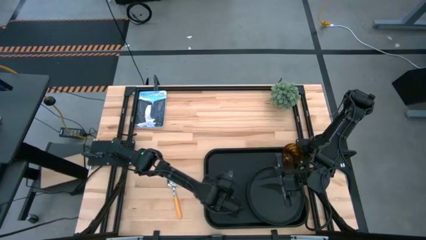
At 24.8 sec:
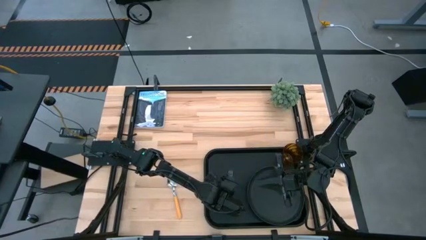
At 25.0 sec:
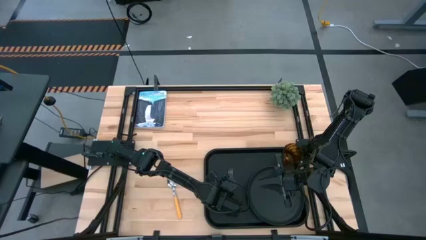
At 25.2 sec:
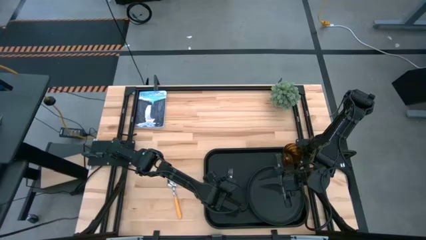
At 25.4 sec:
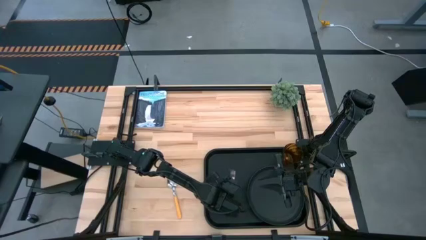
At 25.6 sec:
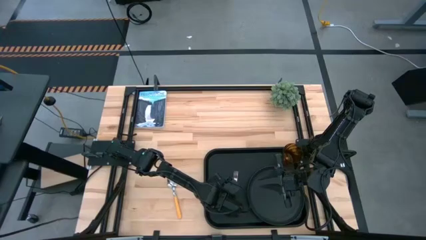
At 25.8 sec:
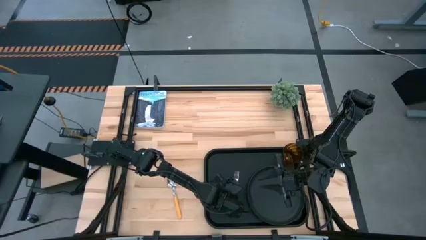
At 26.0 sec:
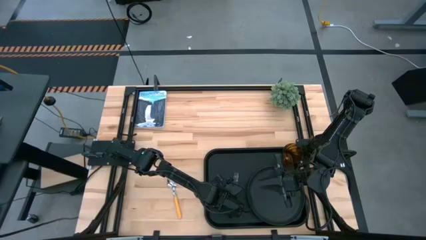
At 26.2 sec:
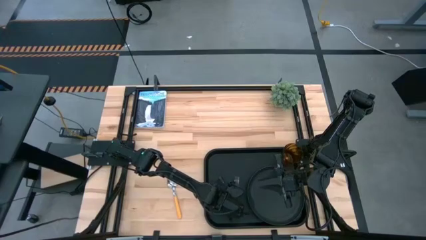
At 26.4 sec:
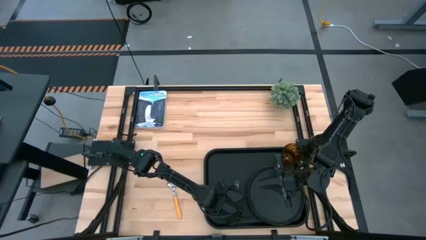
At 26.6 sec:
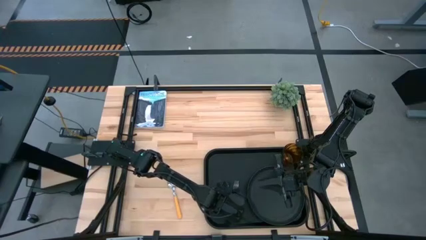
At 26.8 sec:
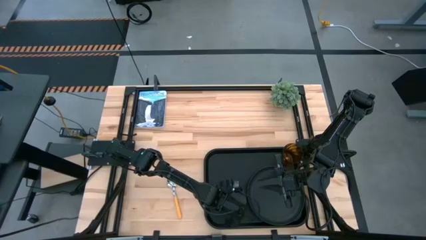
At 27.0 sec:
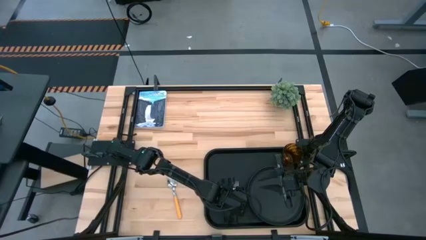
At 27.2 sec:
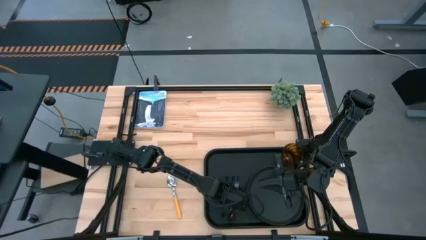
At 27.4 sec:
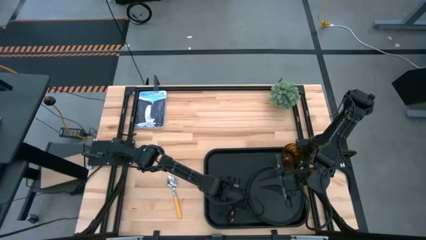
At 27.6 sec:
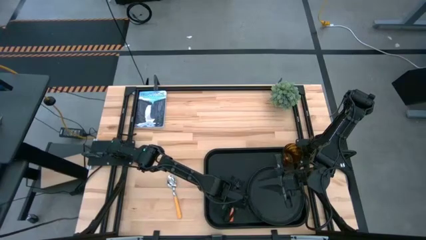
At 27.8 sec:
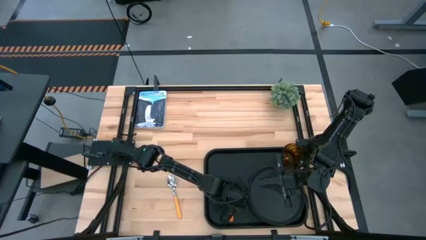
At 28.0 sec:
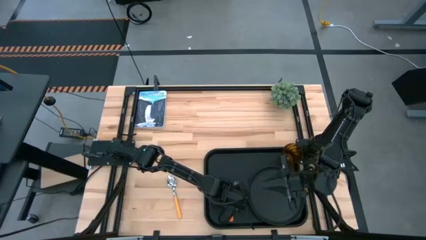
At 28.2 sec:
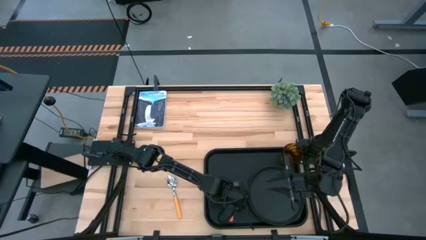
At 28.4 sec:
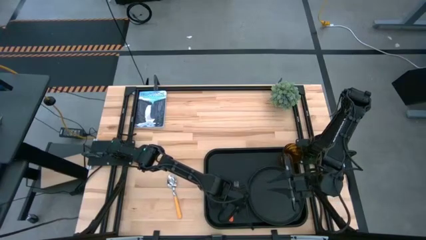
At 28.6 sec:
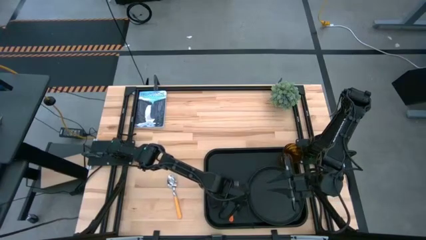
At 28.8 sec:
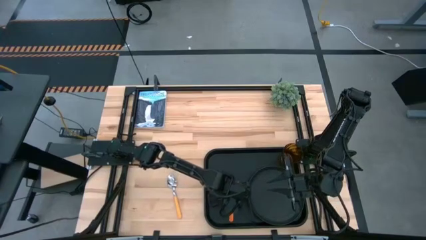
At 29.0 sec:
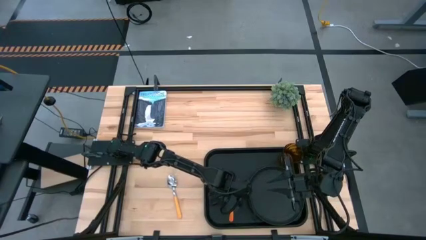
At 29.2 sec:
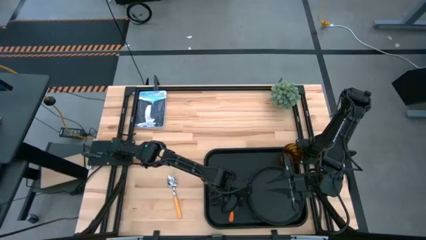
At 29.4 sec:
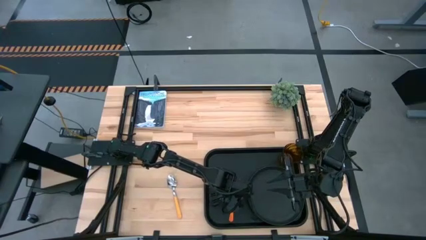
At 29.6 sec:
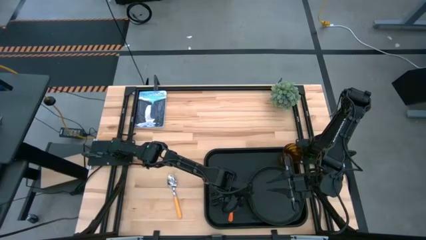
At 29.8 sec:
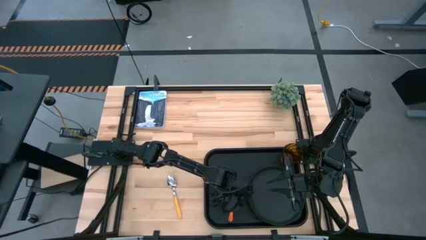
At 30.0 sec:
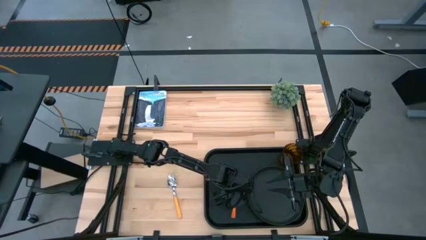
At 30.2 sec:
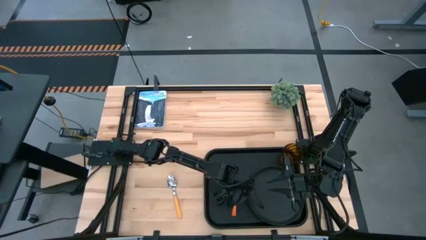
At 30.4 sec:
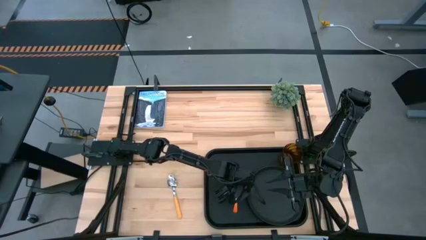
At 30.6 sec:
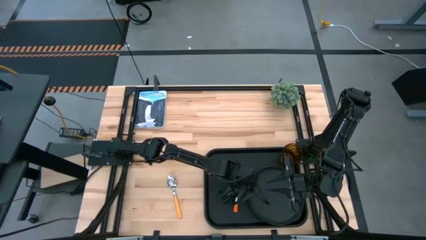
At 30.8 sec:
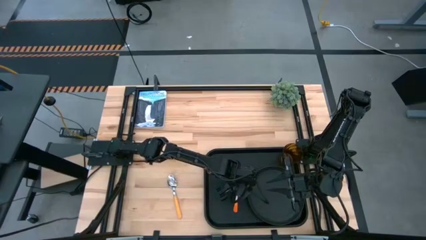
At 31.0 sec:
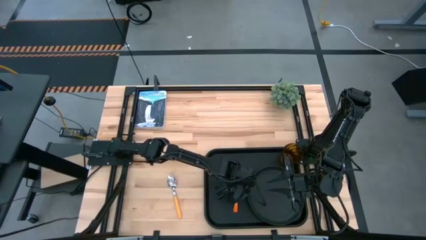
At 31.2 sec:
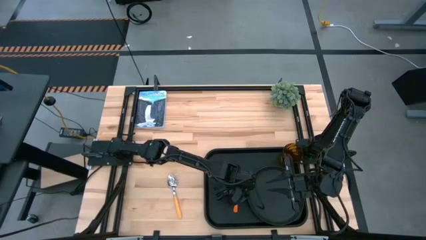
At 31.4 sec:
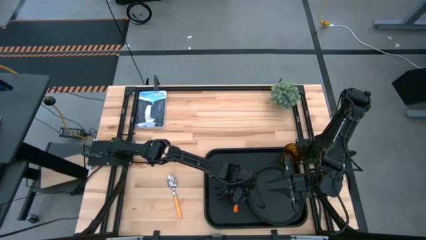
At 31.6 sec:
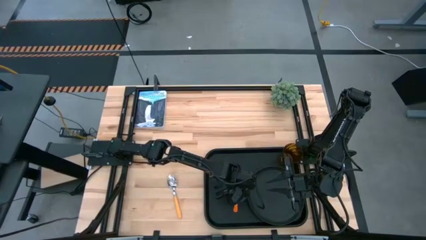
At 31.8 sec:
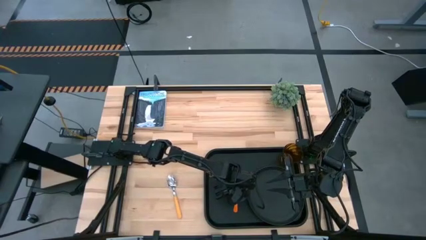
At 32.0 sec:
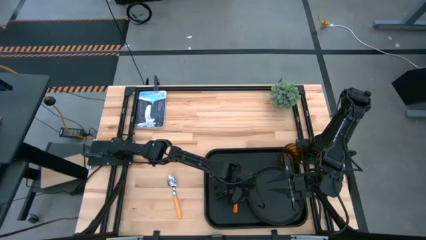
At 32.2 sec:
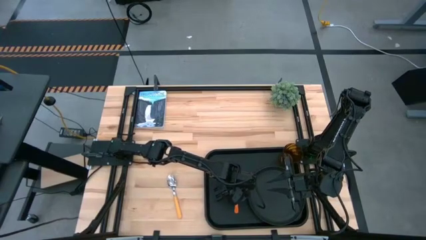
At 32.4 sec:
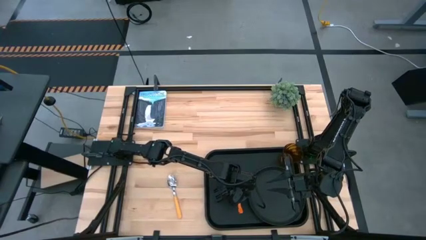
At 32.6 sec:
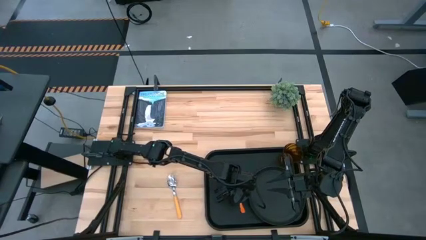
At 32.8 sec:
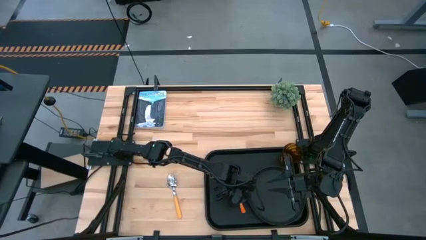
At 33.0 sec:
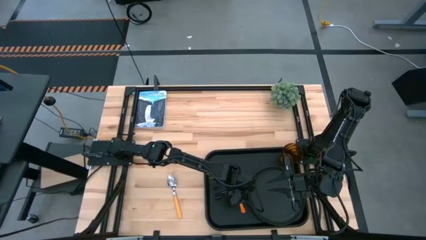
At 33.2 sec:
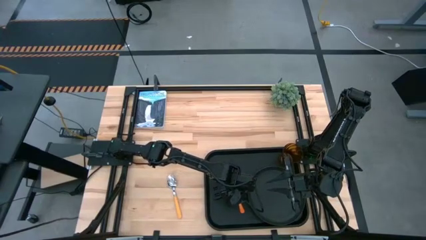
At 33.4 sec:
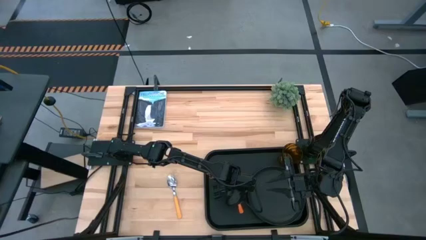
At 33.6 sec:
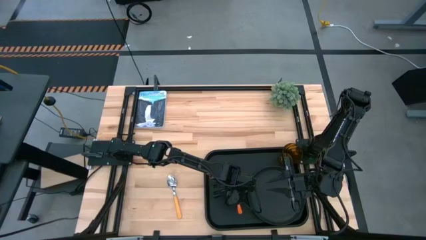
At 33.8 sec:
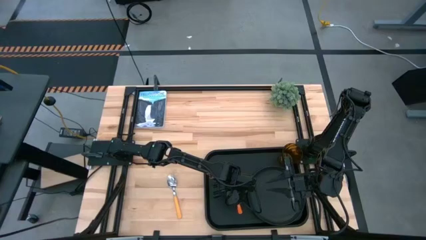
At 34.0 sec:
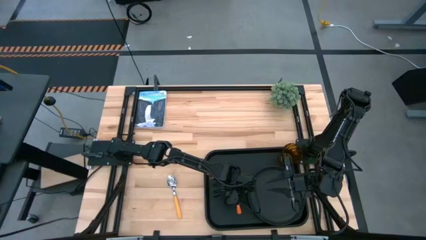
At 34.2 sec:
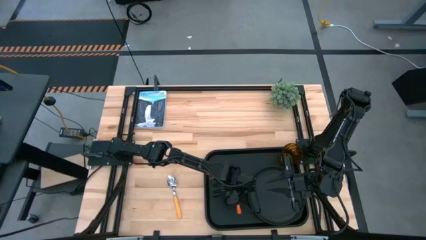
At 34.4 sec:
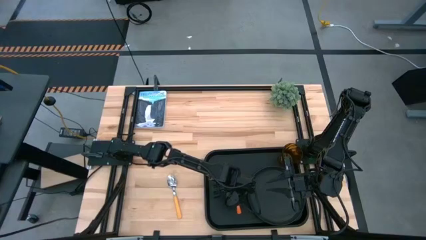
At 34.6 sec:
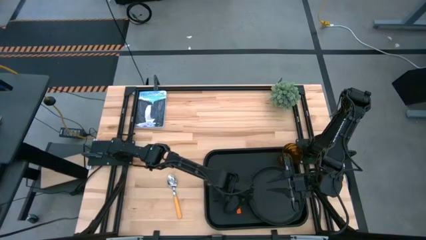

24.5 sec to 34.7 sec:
Task: Pick and place plate/cup/fork/spoon on tray
Put the orange fork on the black tray to the left of the black plate

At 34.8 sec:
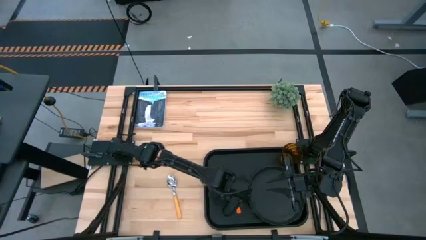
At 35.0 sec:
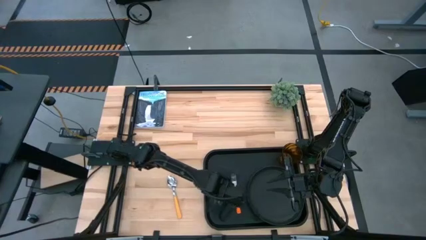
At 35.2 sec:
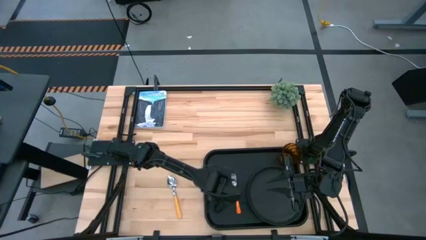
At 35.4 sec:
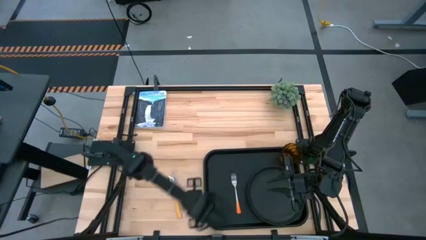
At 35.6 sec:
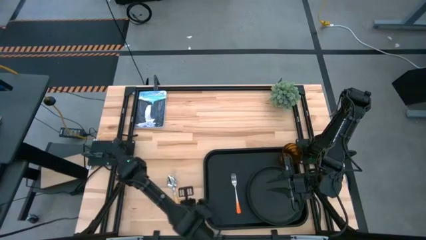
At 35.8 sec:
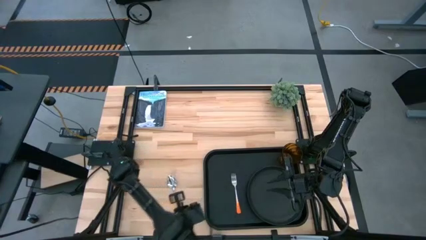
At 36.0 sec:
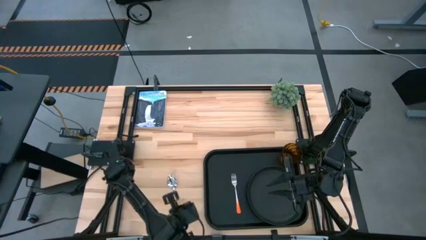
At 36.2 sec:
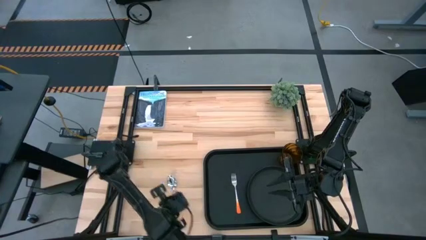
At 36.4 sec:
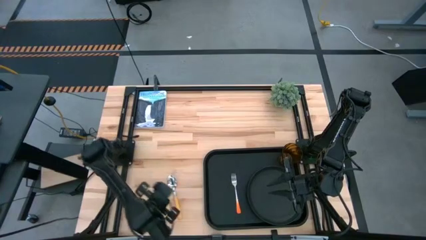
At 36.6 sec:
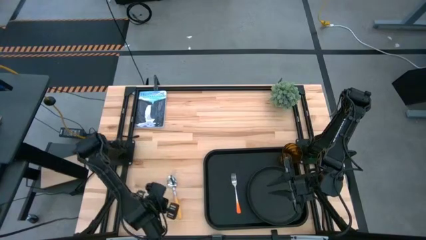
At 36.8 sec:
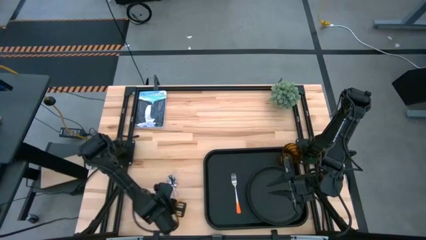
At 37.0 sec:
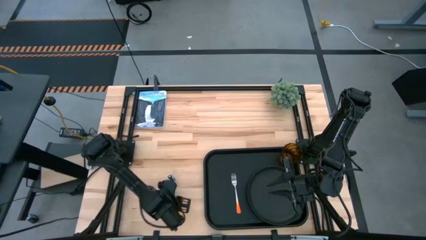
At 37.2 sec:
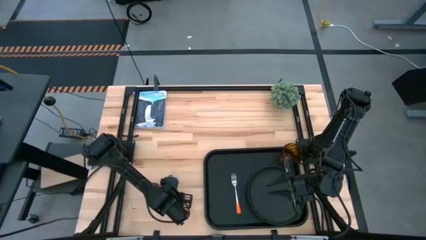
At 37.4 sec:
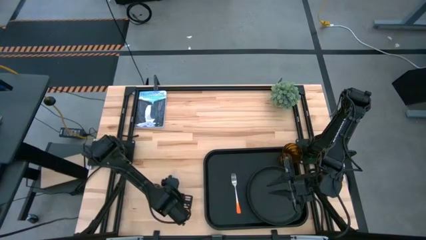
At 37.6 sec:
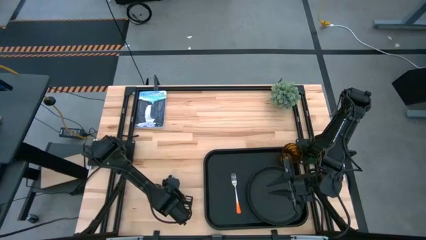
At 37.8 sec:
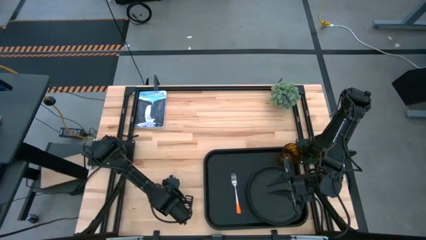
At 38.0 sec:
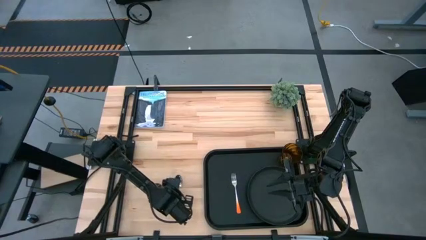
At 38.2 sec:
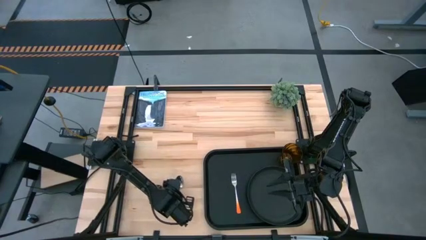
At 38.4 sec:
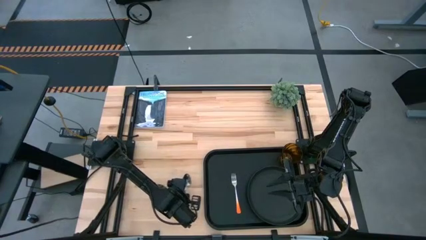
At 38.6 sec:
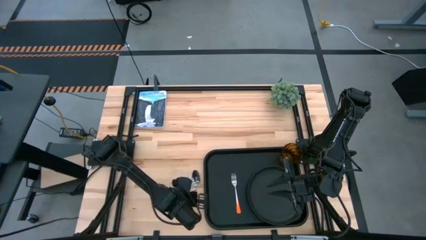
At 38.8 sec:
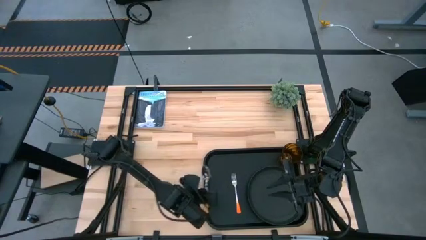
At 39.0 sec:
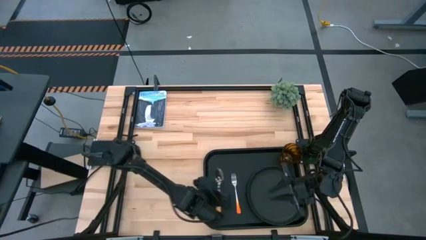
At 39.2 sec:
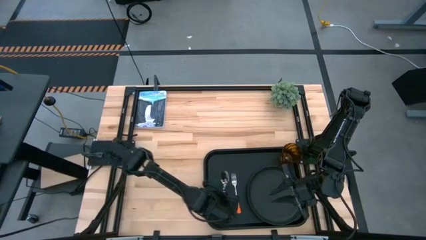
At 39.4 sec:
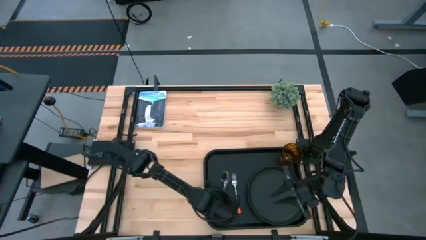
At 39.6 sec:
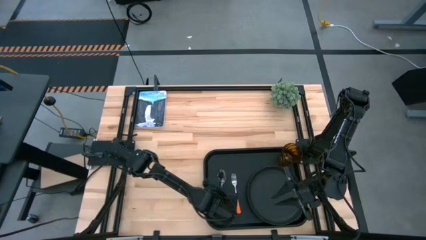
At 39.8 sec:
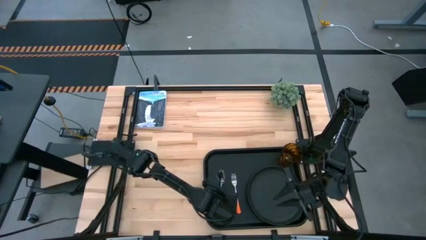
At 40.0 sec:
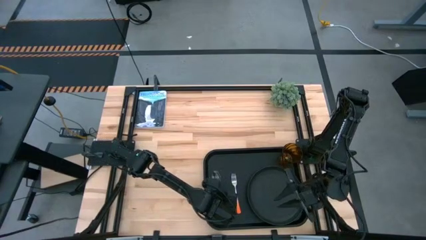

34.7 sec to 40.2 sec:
Put the orange spoon on the black tray to the left of the orange fork
